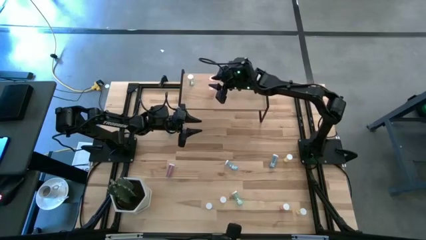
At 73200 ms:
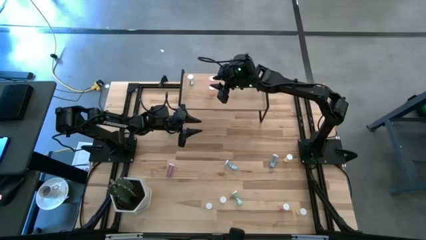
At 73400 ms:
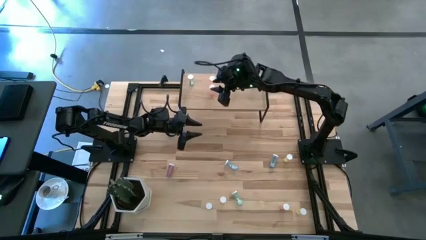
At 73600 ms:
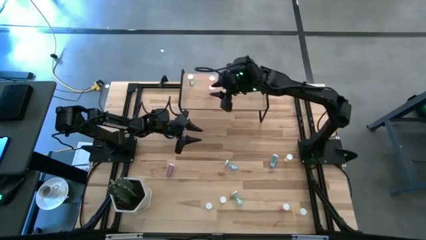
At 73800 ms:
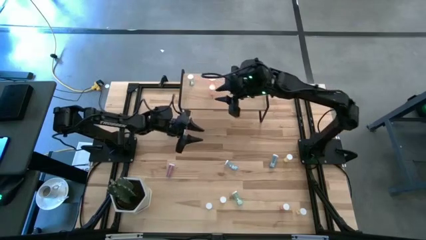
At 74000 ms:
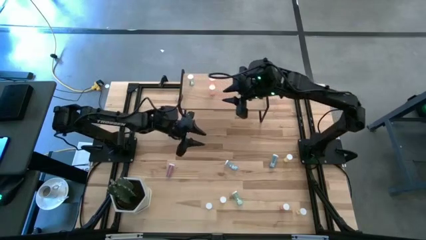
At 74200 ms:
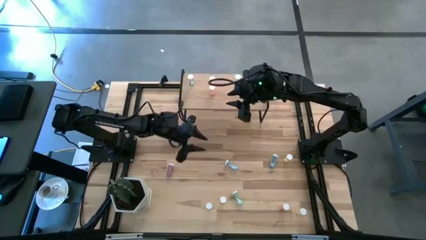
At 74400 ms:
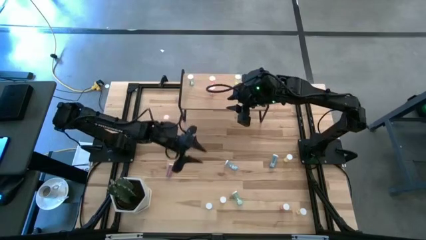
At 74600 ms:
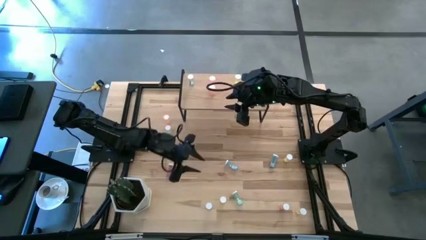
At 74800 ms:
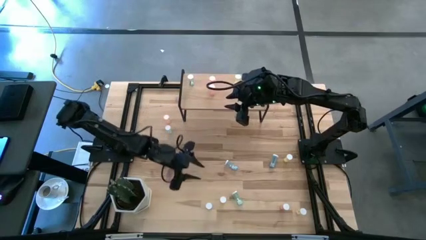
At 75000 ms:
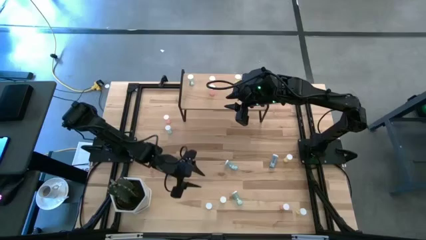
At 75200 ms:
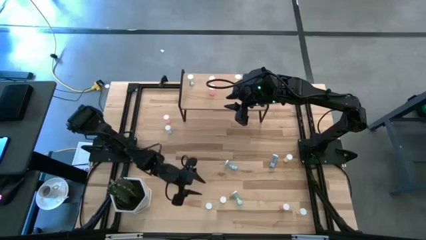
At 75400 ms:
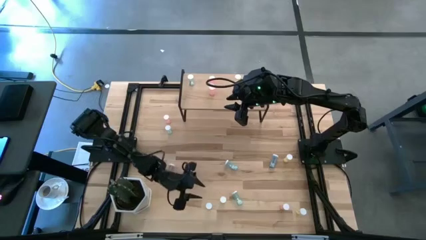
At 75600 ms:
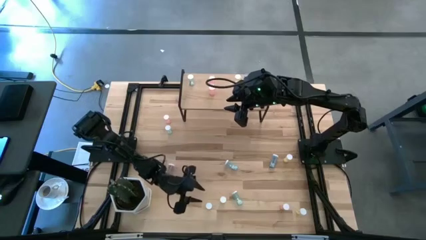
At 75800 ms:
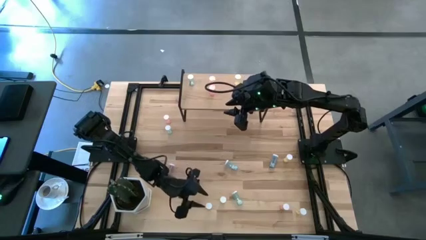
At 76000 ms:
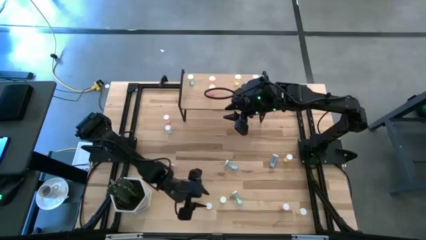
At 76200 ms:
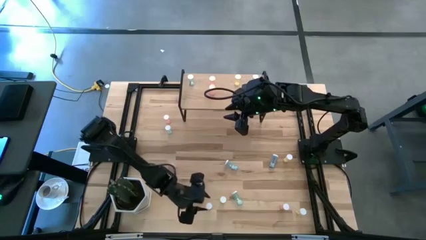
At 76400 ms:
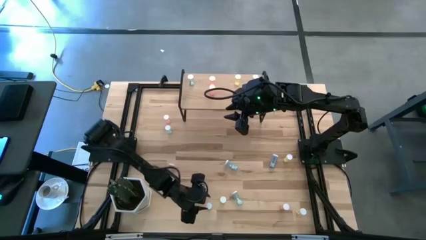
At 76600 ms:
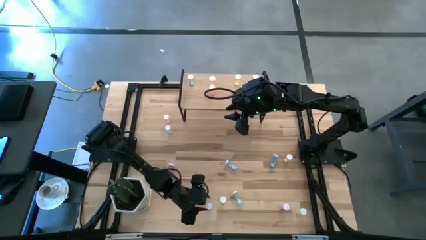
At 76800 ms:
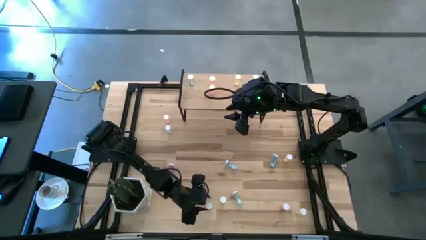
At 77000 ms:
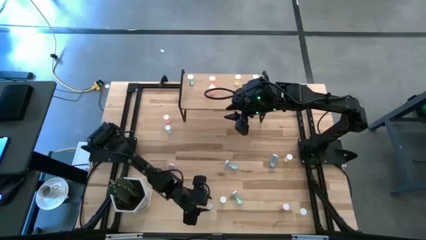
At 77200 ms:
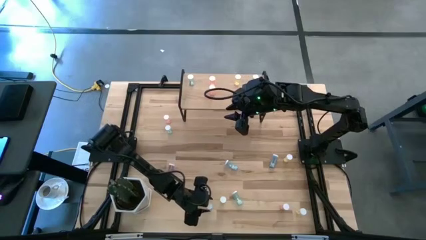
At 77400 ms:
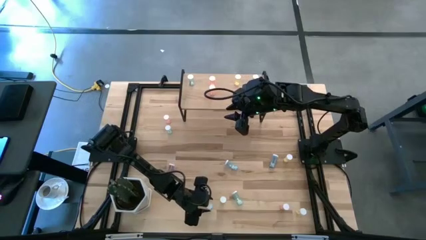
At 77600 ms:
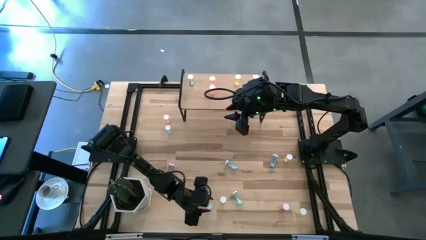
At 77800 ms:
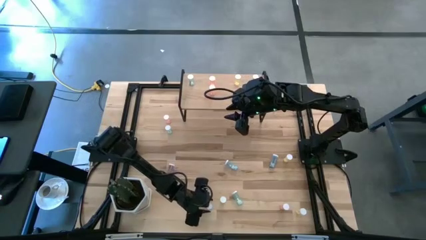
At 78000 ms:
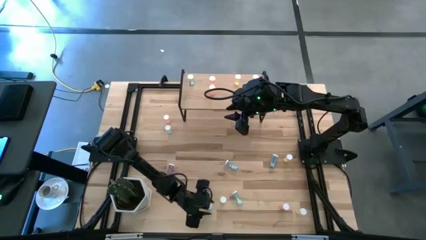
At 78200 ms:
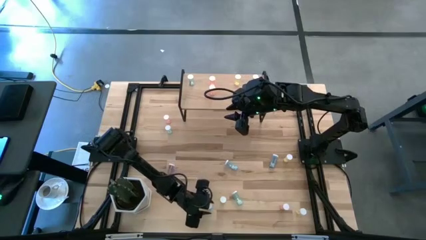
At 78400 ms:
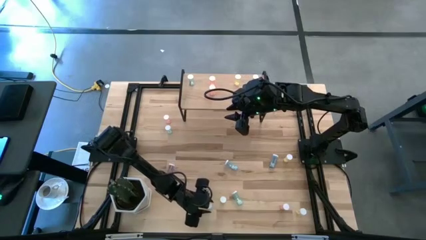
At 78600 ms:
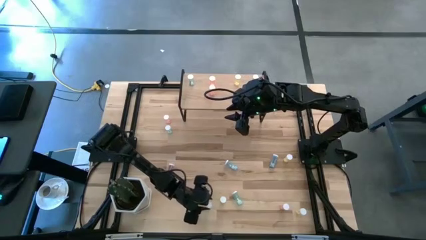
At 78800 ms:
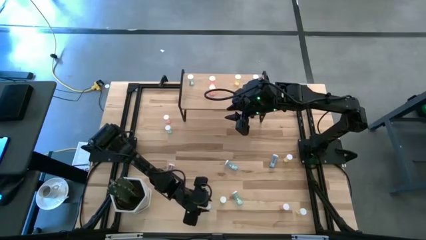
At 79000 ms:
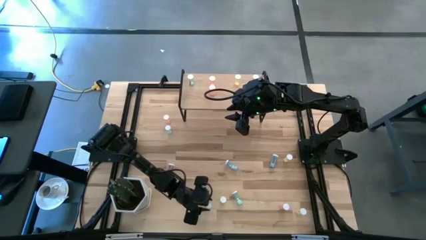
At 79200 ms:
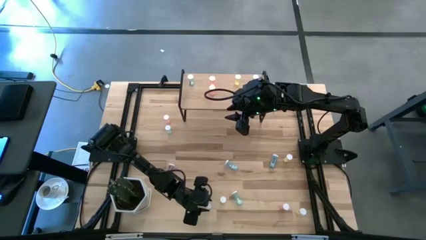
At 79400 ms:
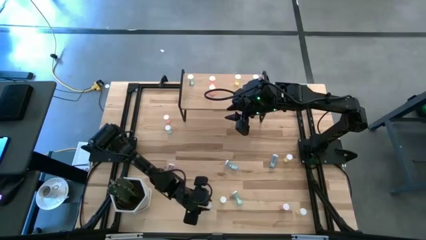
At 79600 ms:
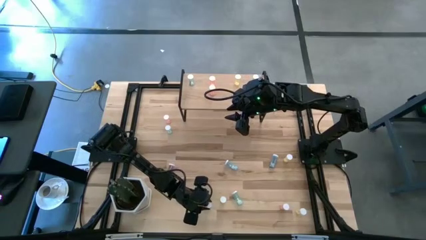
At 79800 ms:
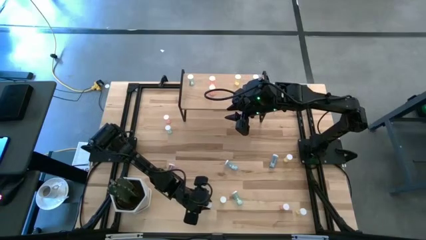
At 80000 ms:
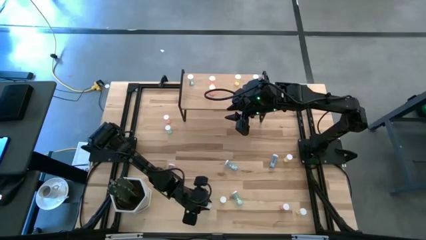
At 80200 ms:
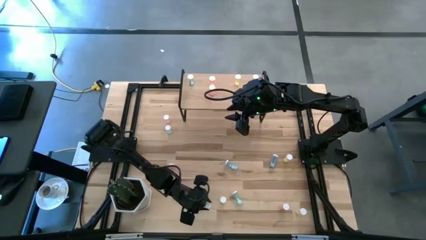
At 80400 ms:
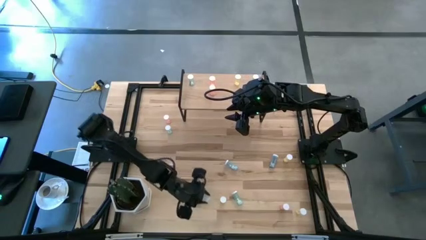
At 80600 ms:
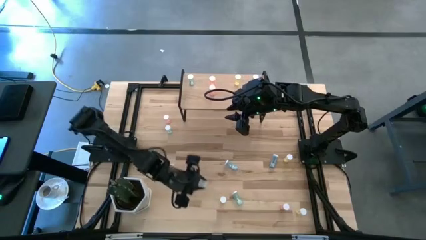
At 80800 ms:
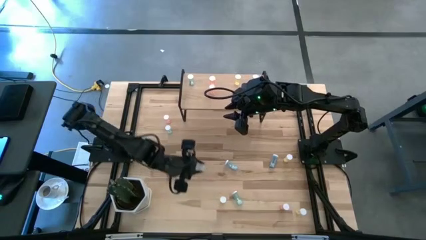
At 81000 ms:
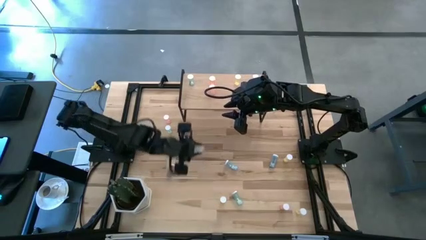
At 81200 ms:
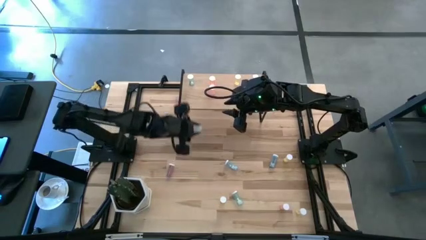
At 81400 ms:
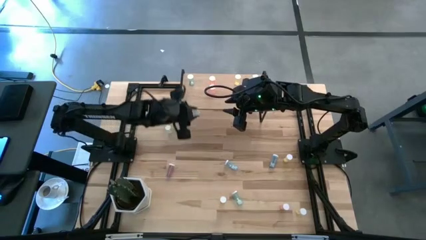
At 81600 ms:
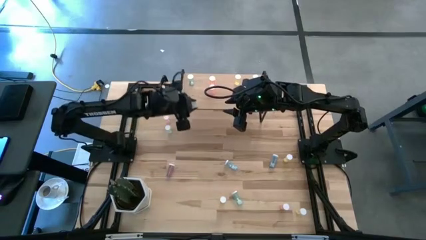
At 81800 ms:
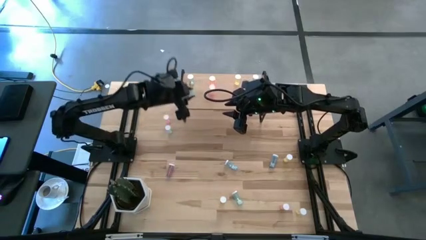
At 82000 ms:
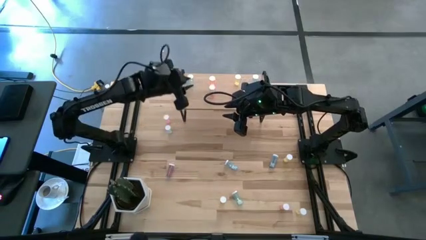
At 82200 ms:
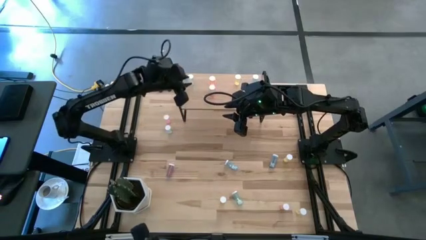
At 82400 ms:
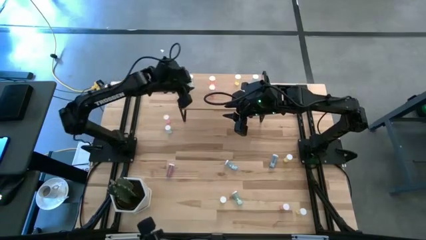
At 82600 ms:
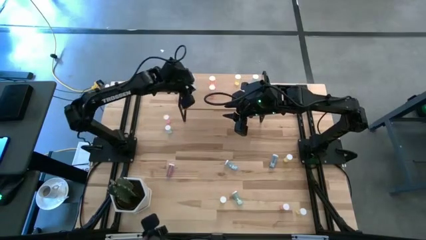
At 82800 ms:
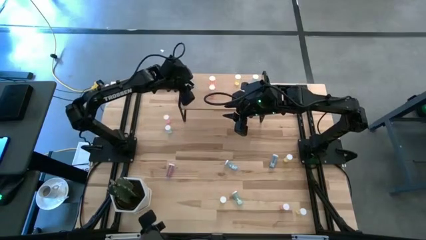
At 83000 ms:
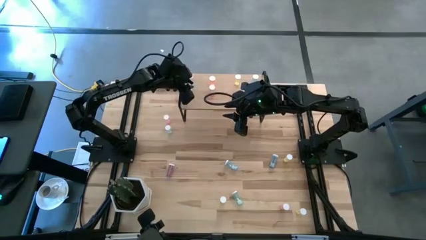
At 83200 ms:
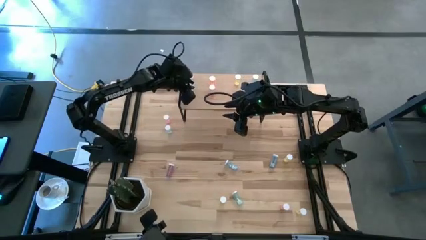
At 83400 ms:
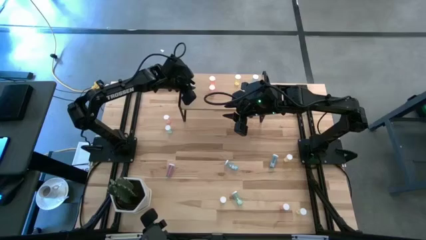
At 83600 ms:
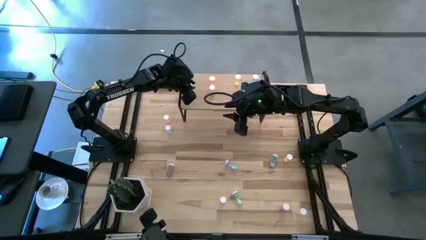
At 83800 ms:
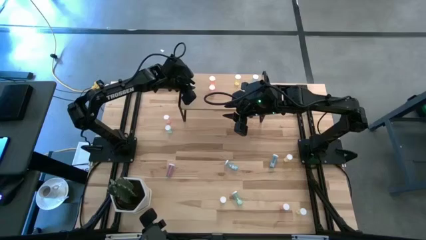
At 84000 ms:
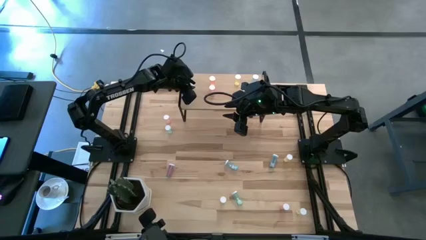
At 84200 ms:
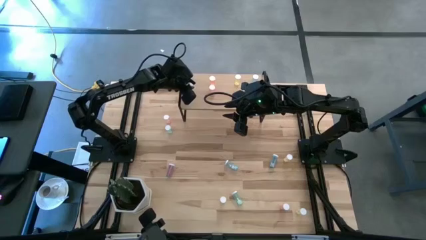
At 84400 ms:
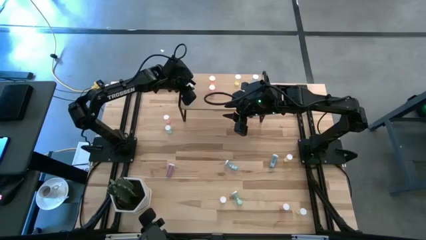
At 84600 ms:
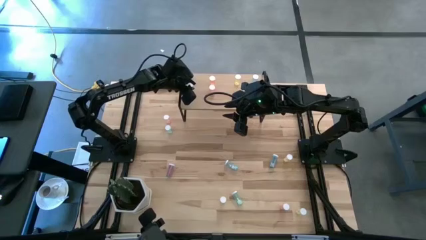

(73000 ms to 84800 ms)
Task: Pick and place medicine bottles onto shelf by color
Align the green pill bottle with the green bottle on the shelf
